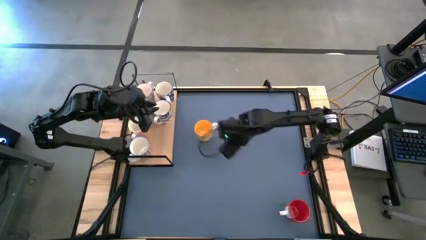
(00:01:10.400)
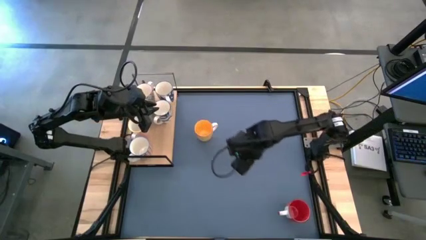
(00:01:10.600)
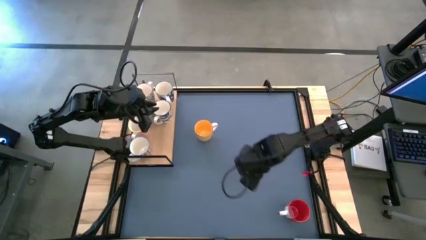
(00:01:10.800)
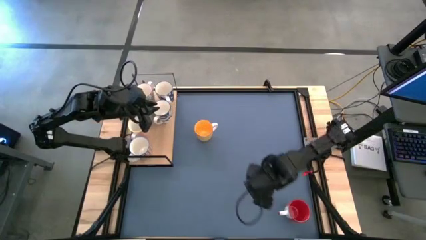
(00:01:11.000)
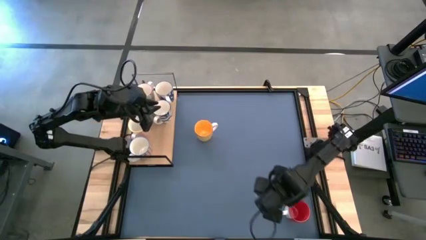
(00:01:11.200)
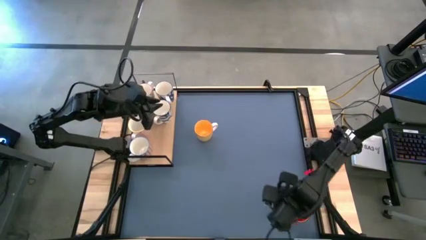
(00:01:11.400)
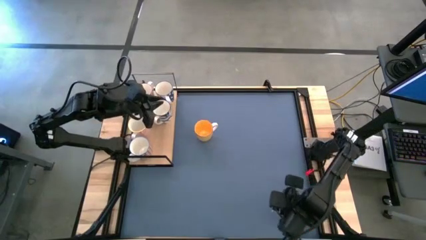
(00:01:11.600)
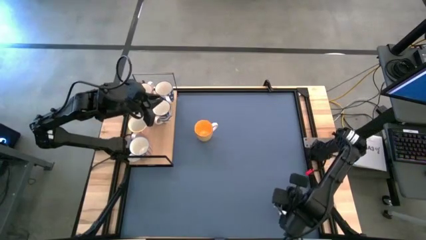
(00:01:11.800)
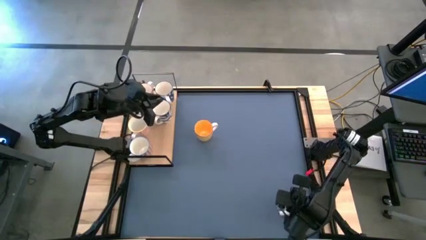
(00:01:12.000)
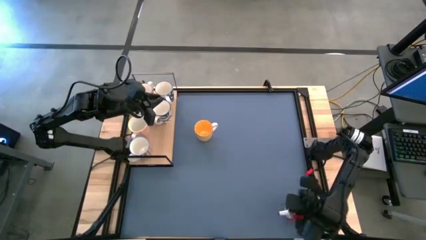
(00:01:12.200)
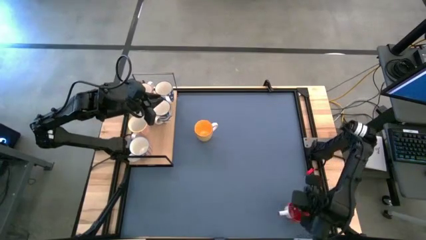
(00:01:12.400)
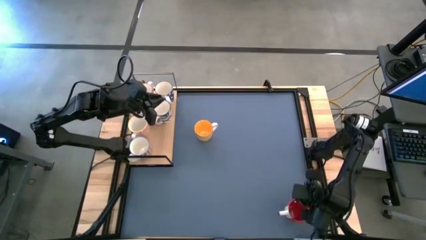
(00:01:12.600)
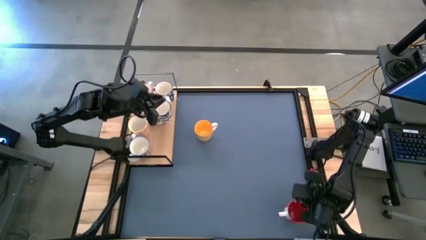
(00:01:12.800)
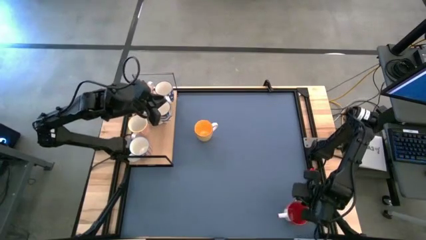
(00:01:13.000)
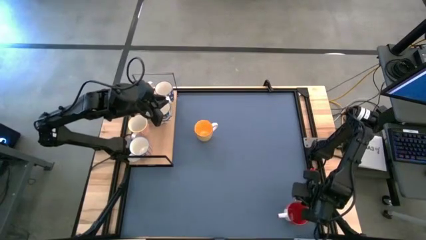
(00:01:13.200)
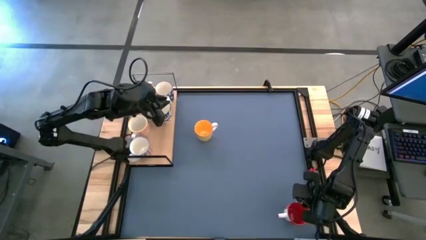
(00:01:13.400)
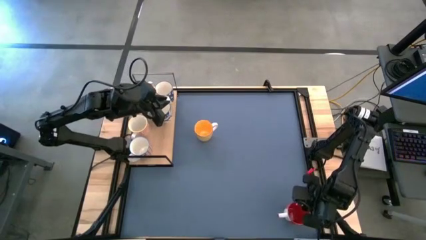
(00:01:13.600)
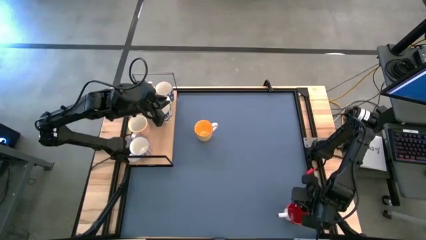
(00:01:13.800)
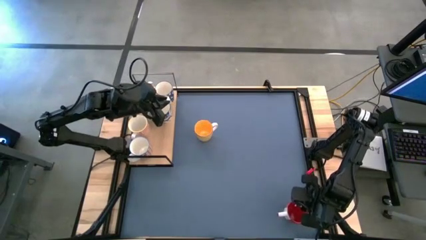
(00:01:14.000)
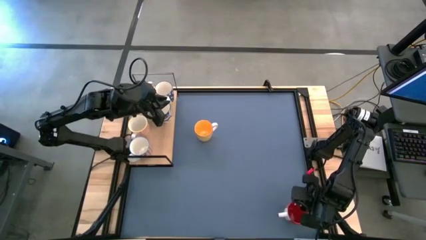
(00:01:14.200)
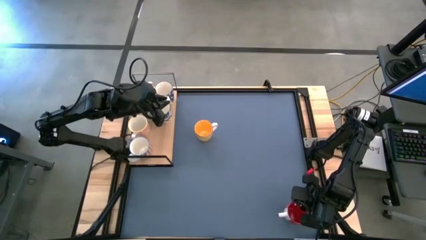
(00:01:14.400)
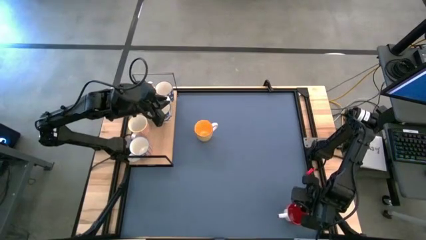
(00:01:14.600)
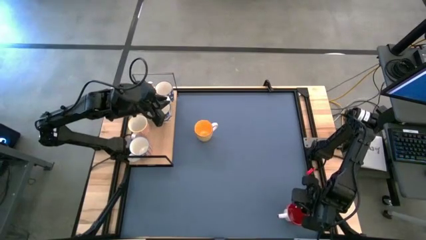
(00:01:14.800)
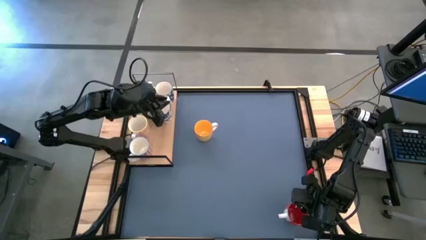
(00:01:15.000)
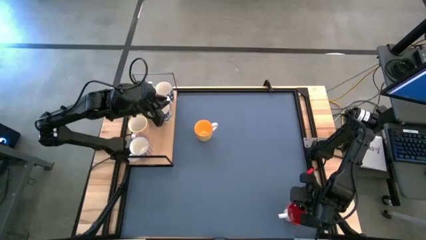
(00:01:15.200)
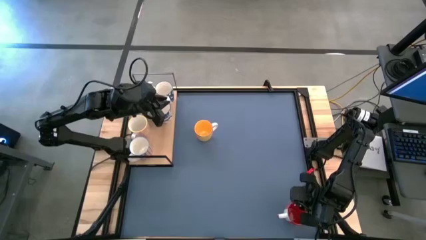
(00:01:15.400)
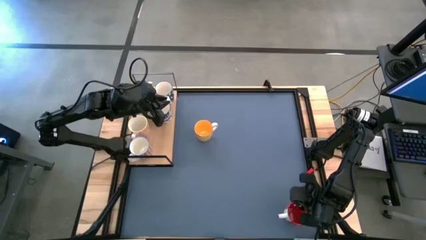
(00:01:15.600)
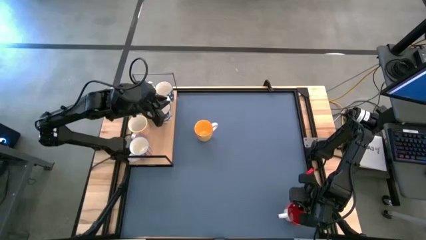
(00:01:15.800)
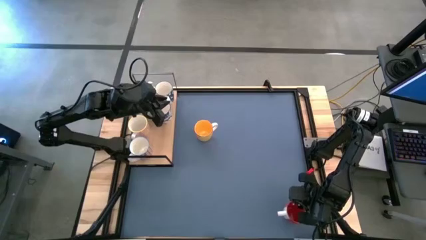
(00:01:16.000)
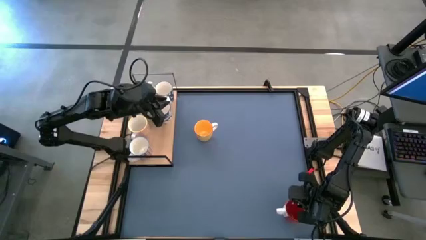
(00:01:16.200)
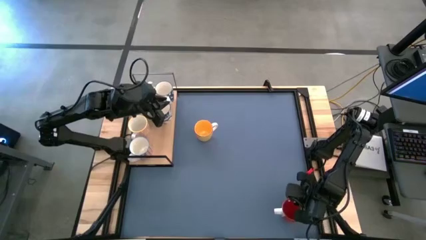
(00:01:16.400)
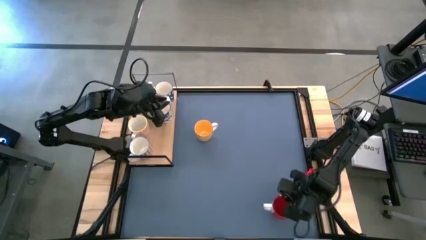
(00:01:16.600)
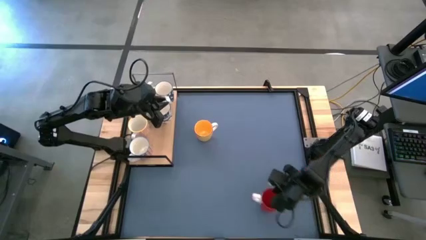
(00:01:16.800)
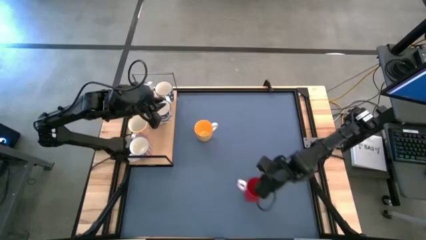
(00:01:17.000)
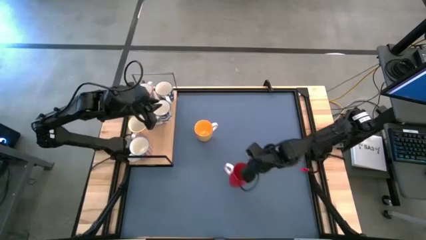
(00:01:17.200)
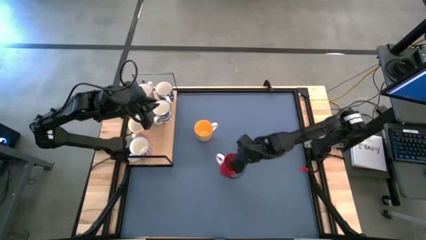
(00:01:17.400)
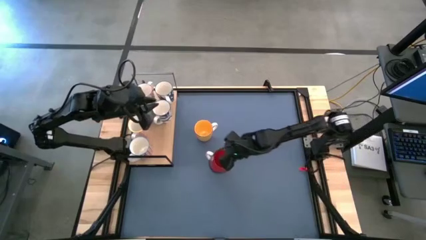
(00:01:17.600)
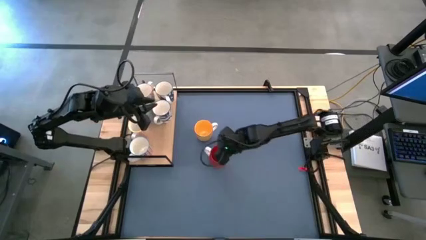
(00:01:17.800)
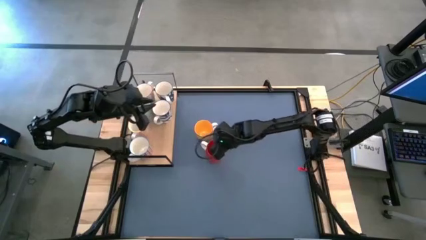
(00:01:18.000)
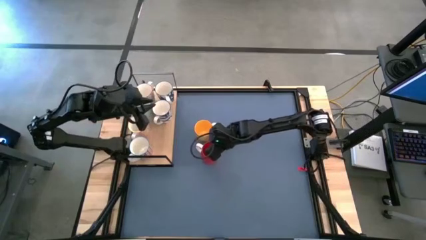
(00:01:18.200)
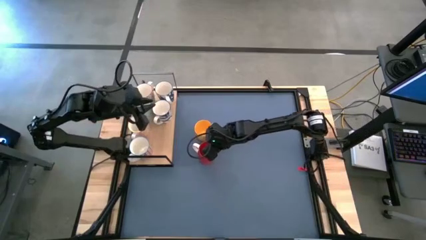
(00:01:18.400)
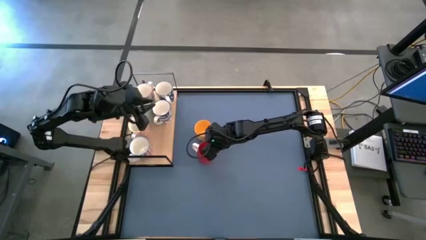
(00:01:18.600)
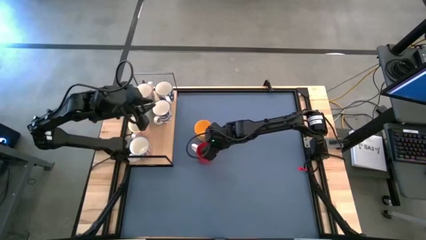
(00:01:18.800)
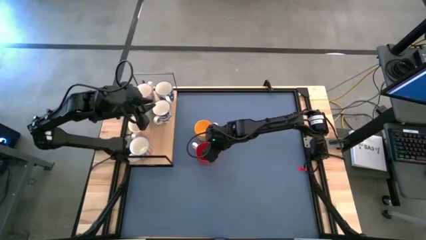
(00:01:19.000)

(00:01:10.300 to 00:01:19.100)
Task: Place coffee mugs
Move the orange mug from the bottom right to the center of the table

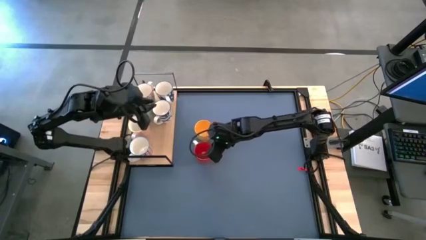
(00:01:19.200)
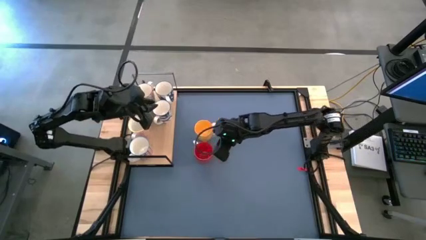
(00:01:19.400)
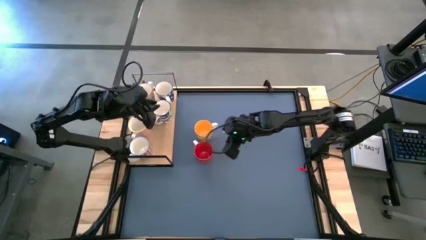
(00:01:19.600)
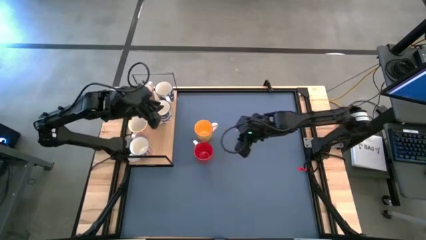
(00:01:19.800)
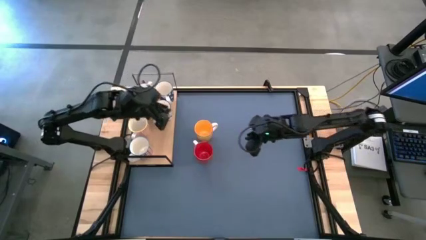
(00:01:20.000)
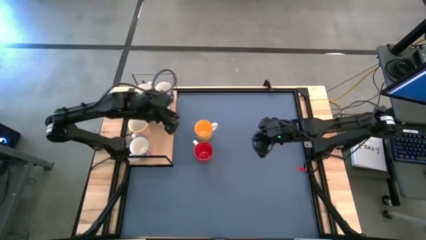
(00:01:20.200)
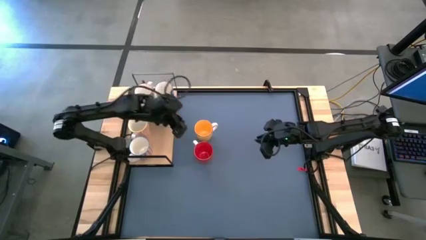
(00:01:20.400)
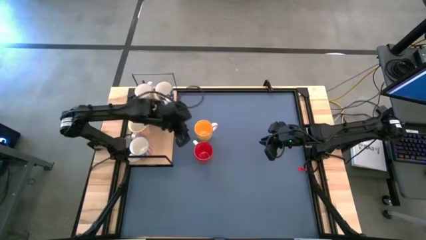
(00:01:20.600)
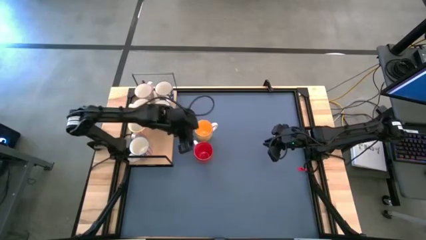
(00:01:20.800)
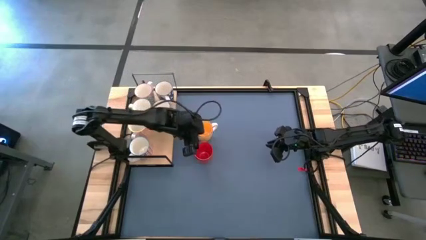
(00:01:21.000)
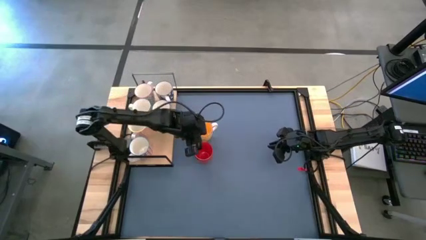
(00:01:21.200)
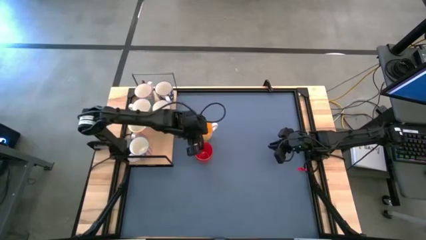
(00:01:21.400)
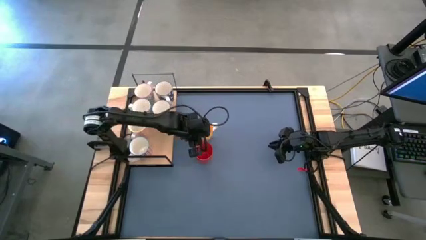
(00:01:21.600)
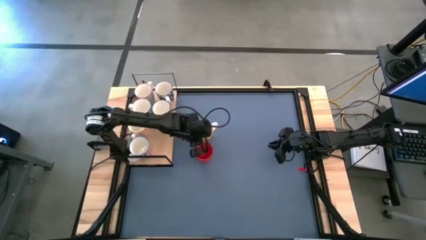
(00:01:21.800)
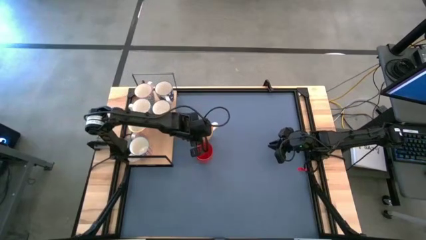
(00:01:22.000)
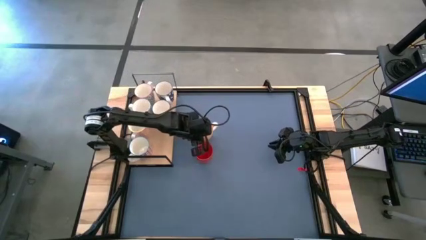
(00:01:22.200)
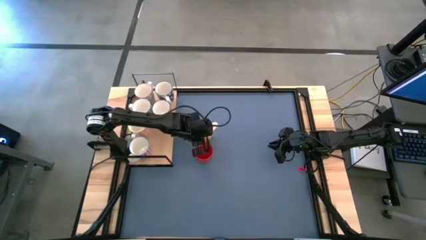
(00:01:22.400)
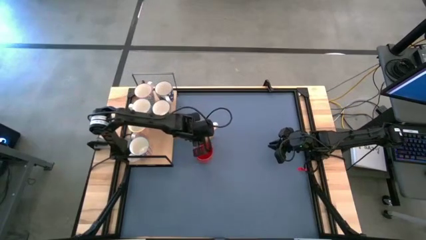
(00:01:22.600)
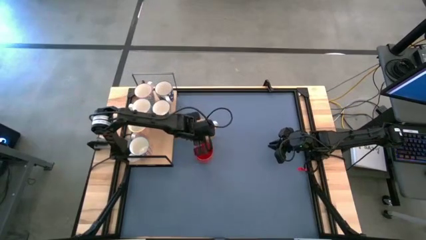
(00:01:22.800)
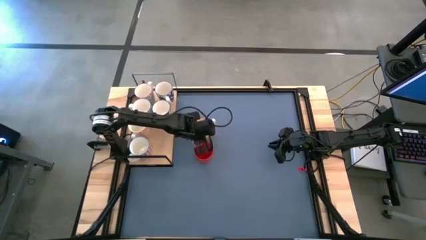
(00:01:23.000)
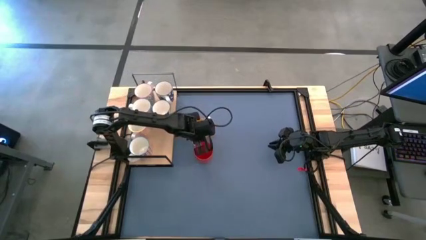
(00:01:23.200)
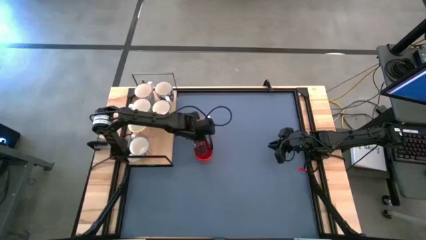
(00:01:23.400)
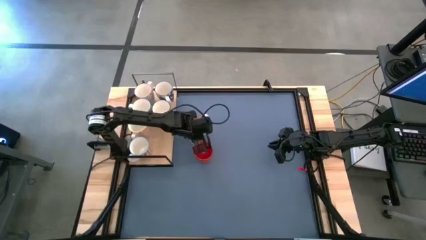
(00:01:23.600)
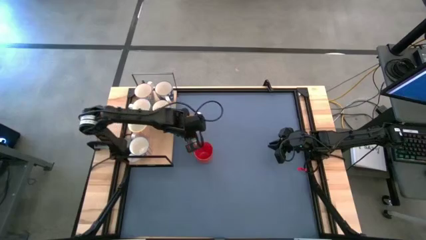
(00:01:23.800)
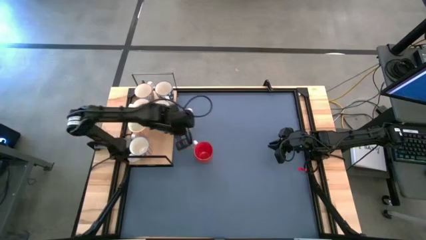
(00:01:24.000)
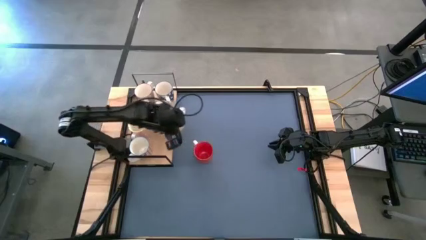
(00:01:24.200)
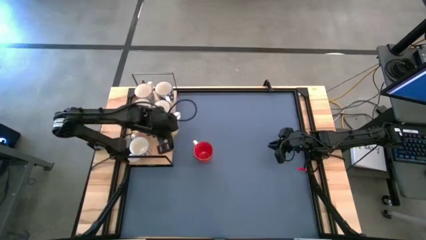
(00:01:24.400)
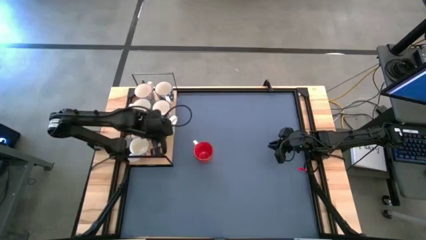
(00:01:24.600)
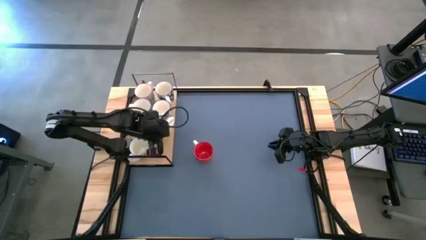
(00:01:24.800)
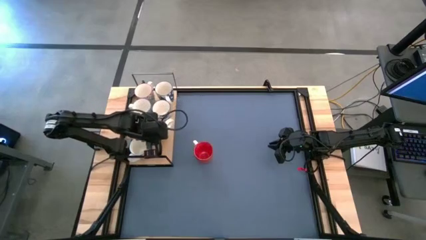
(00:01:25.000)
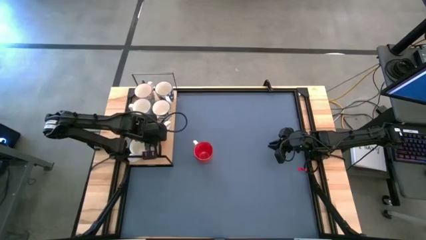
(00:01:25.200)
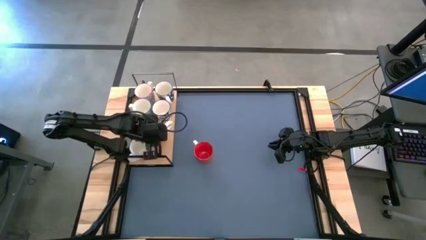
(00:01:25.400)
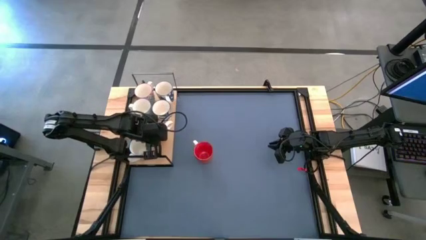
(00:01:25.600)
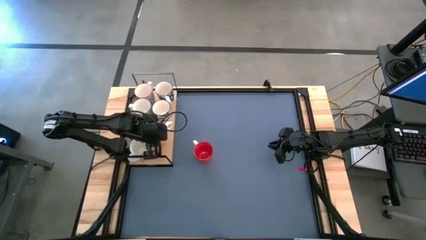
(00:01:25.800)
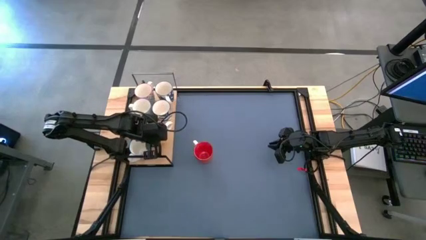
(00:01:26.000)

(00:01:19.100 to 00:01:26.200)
Put the yellow mug on the shelf
